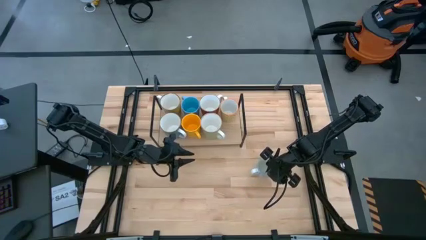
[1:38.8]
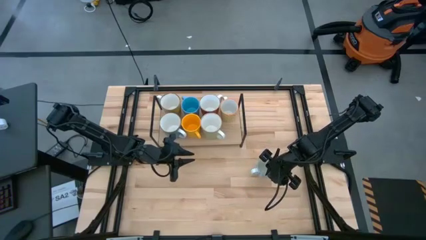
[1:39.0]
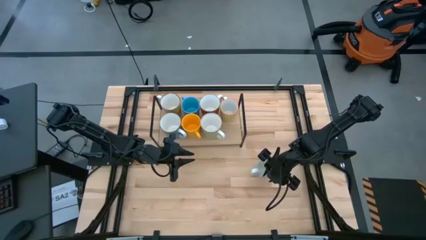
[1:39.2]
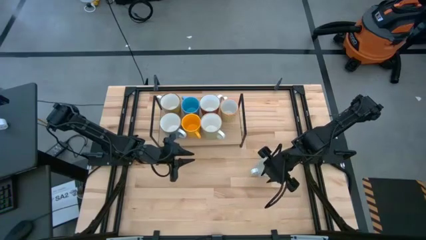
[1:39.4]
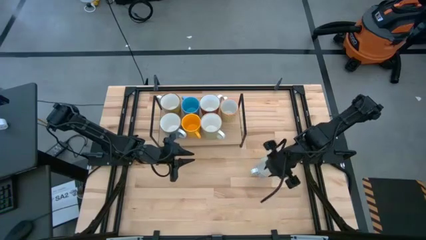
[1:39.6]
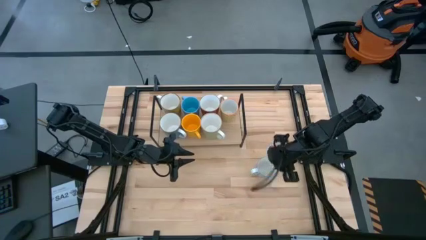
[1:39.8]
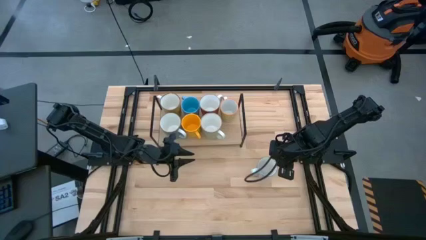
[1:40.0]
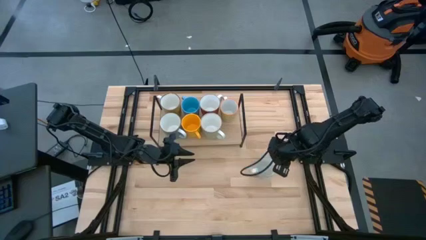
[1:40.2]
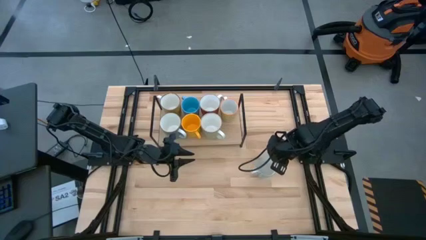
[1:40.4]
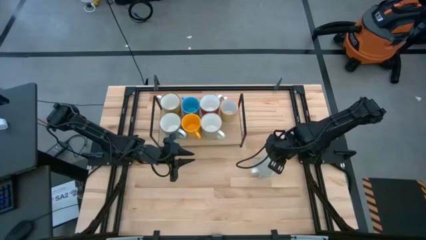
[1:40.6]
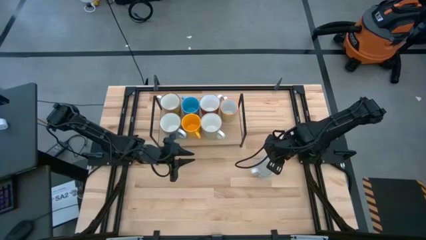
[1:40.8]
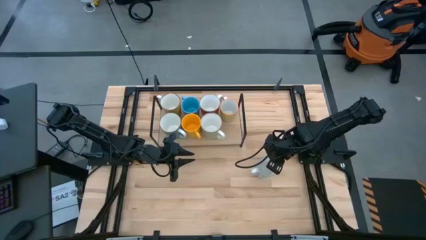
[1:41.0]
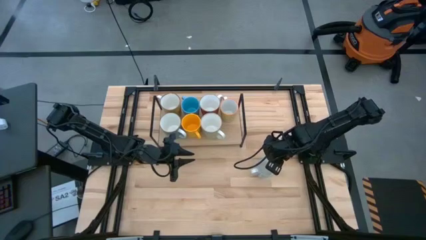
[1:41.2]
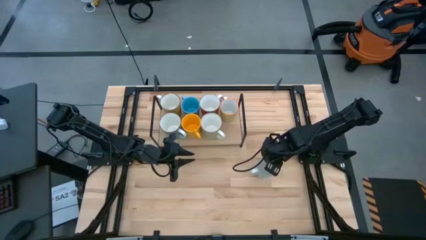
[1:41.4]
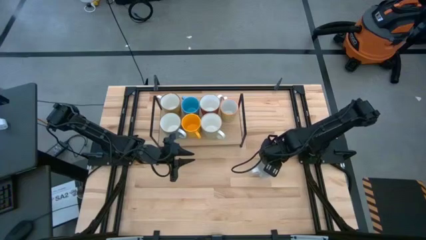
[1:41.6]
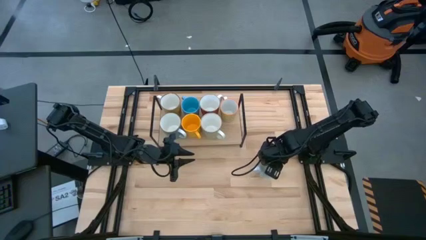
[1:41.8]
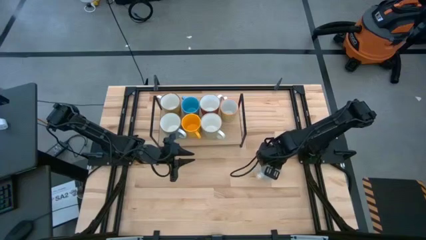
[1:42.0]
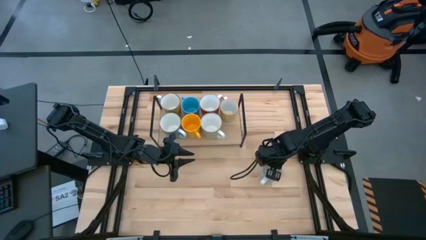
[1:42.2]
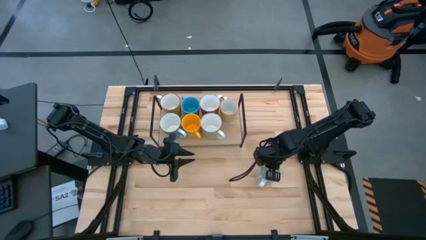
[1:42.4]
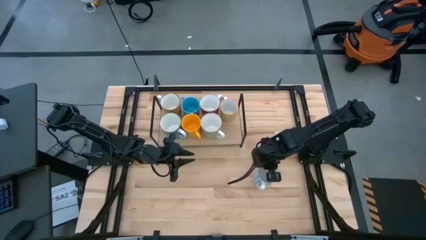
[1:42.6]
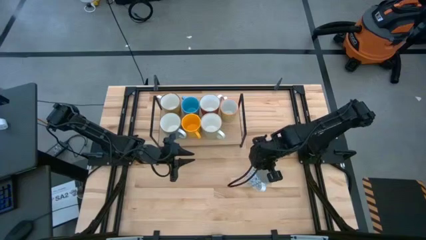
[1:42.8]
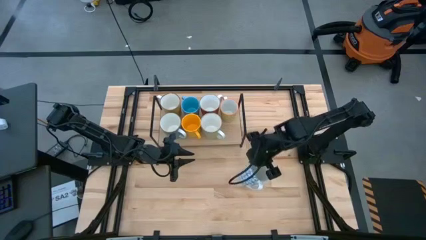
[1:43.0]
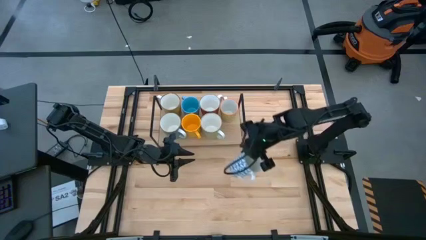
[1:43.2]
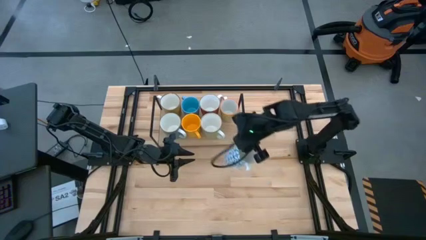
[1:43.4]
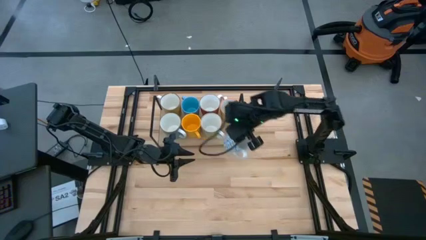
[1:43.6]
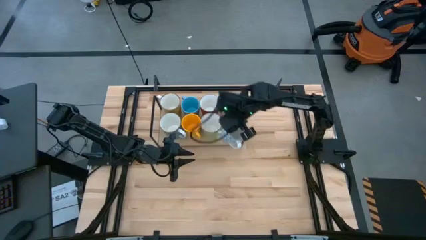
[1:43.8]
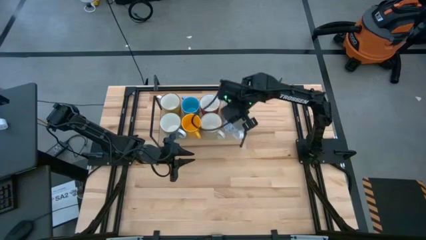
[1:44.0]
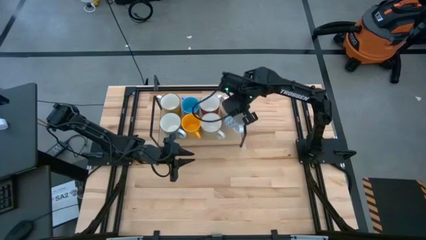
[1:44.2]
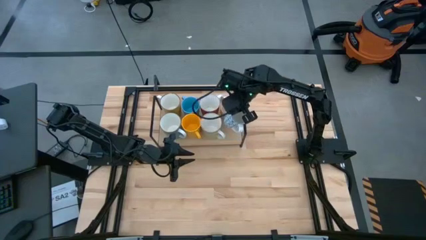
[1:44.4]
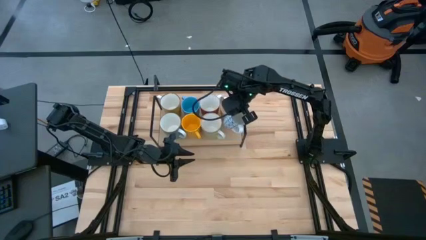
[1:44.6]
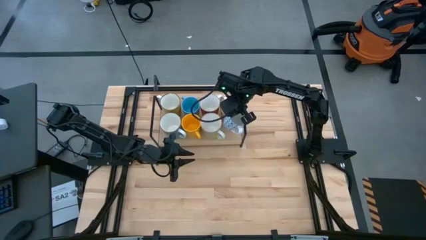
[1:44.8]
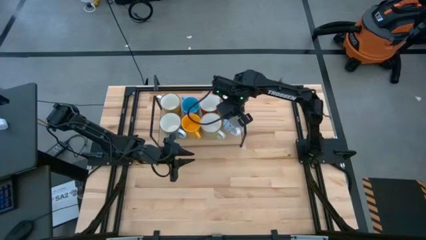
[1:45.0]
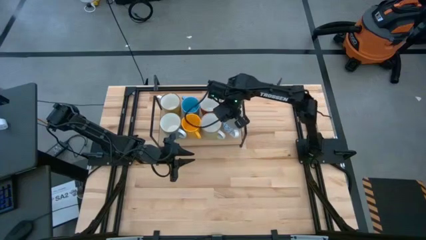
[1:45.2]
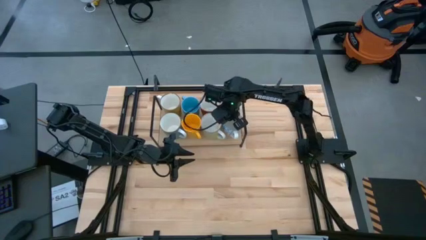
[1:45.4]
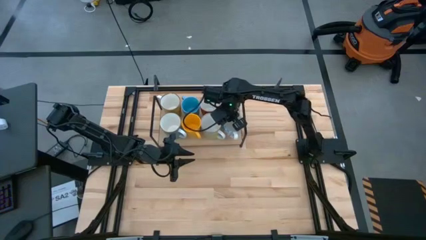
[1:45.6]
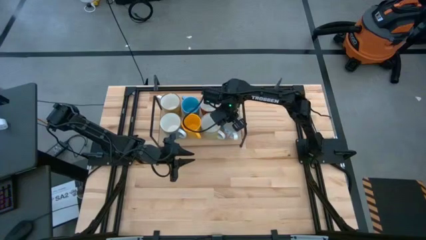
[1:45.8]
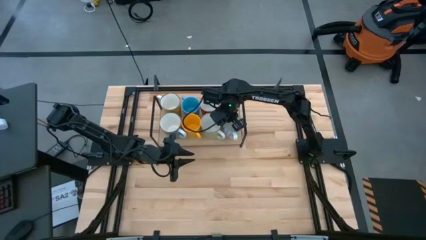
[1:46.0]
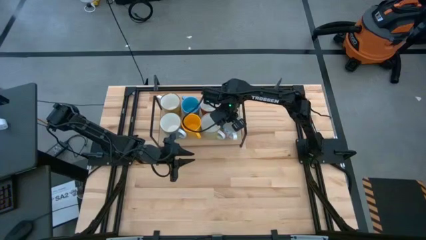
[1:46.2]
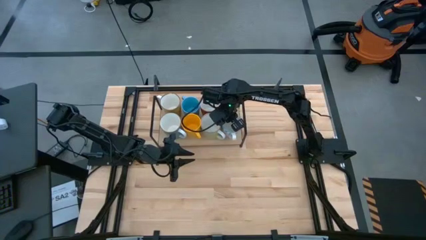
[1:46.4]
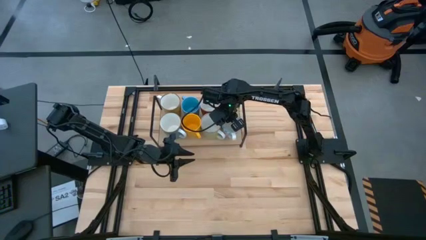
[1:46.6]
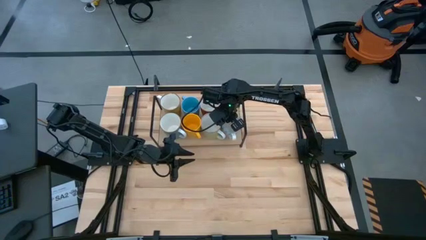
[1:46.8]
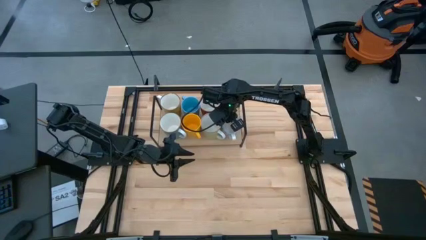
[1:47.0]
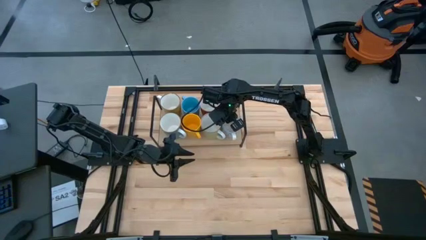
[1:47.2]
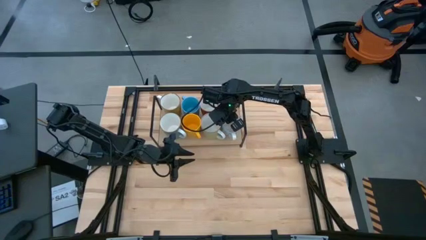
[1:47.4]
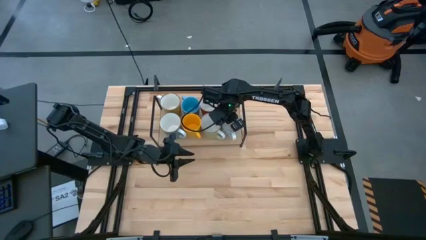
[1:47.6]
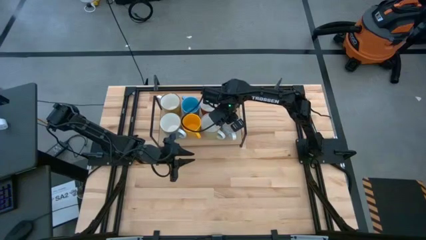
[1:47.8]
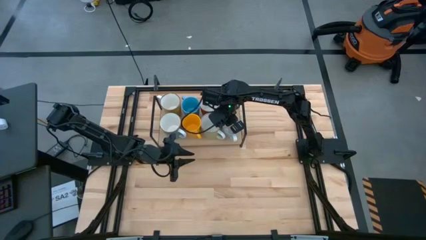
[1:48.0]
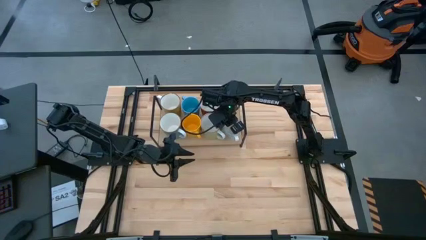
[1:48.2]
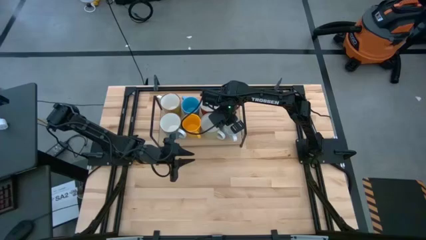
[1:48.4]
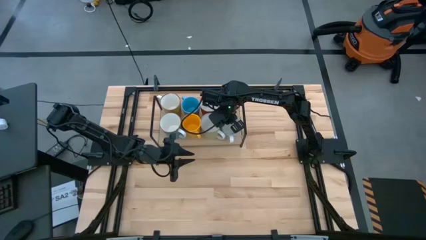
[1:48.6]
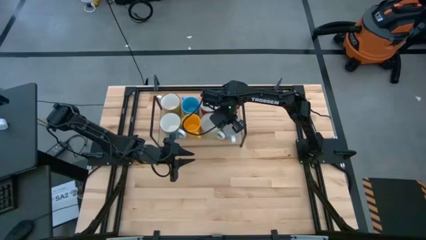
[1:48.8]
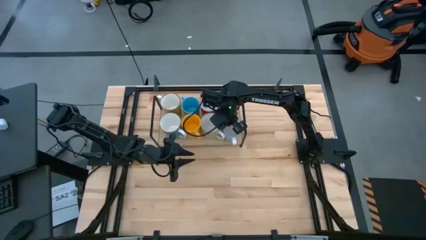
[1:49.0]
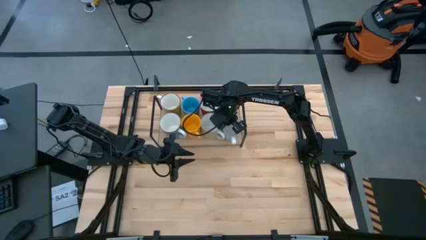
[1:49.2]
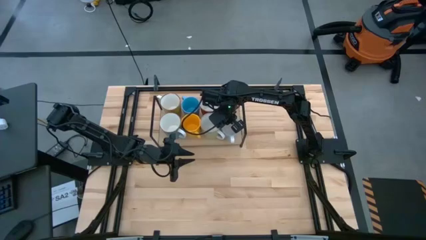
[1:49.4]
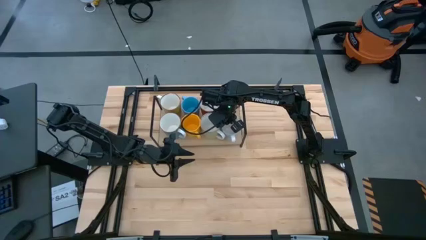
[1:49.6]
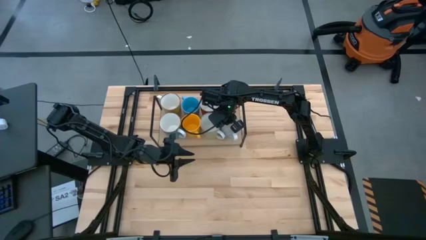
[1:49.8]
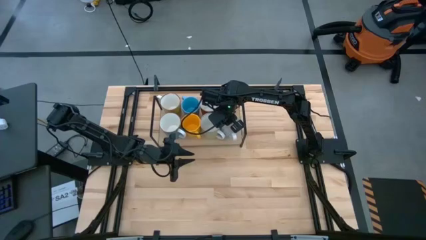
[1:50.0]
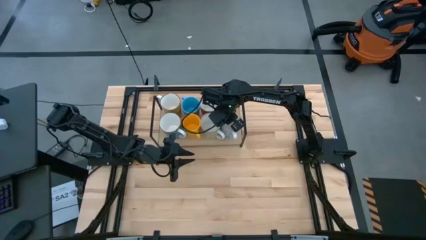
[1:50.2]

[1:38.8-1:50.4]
Task: Place coffee mugs
Put the blue patterned mug on the shelf
